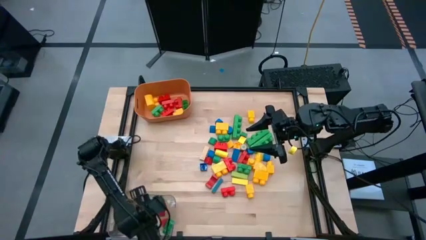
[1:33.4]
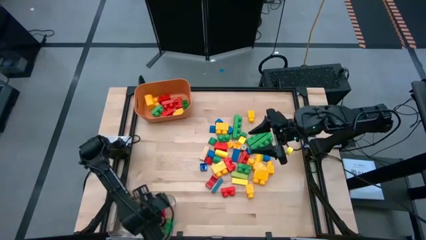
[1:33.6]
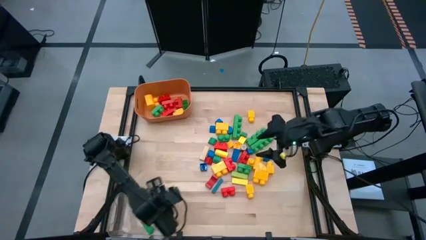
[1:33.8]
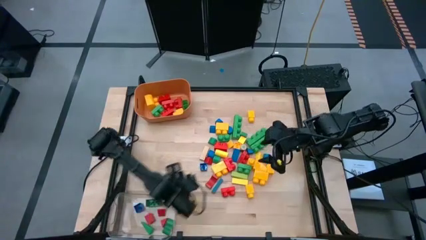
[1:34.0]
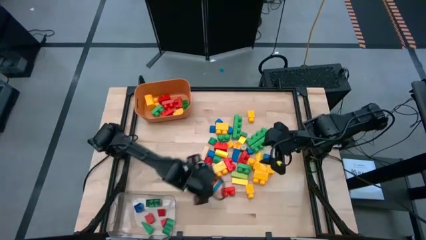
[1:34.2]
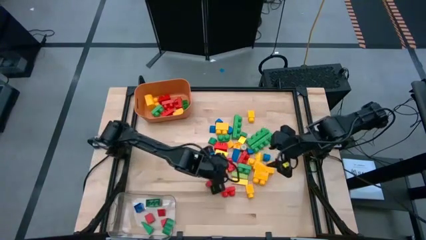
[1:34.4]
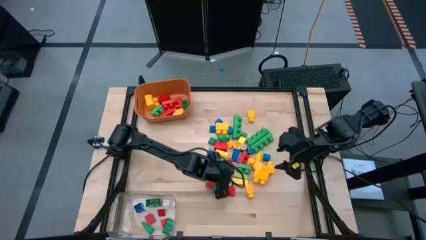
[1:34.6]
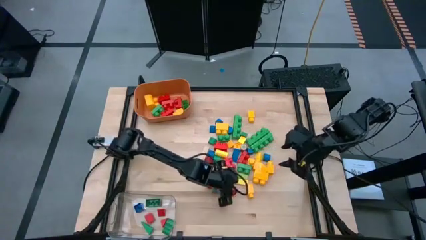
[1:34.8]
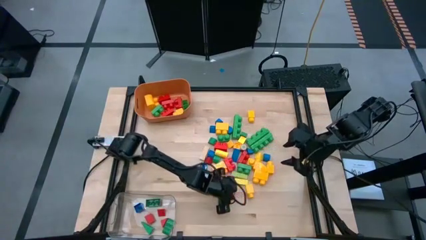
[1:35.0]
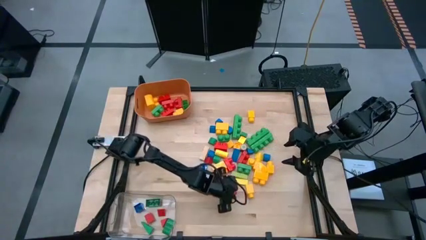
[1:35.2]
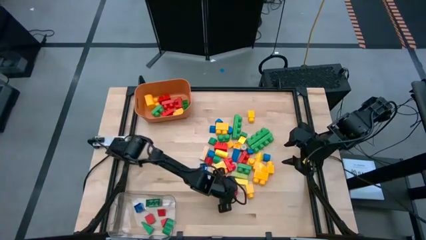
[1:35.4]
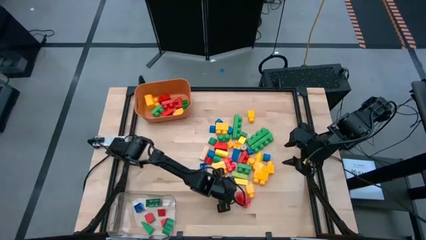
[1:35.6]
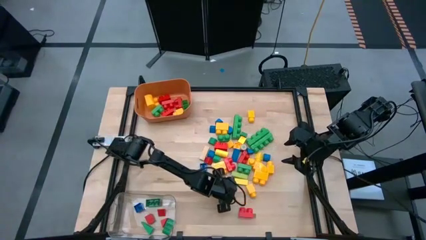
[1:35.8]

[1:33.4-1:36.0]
Task: Sort blocks by size
Put the big red game piece into the orange bin

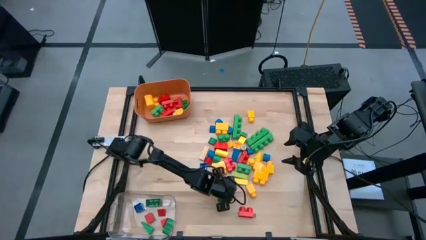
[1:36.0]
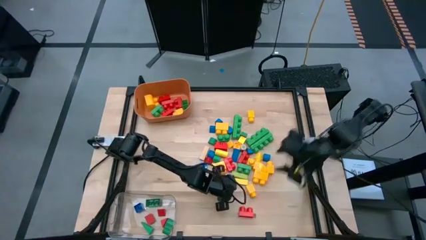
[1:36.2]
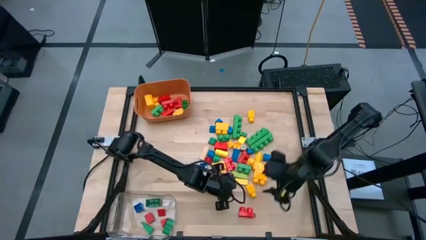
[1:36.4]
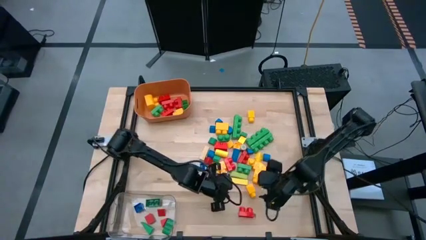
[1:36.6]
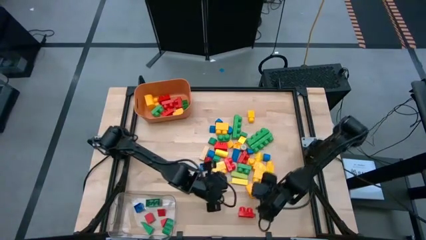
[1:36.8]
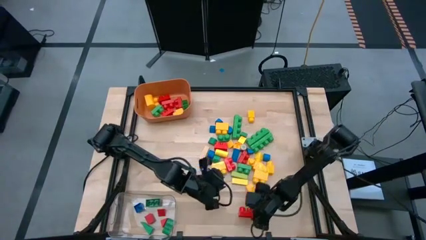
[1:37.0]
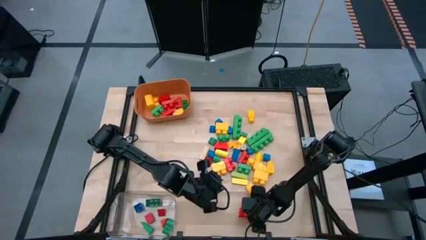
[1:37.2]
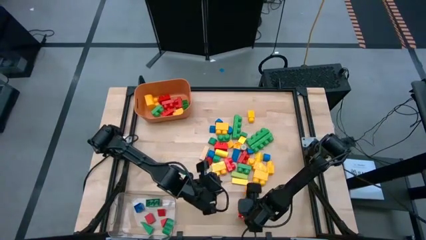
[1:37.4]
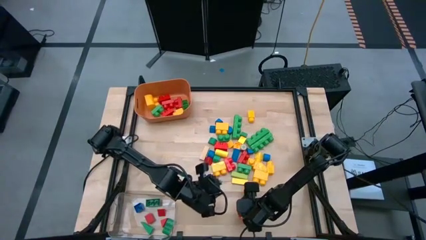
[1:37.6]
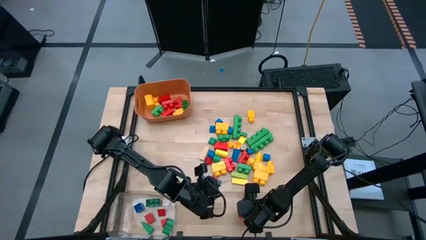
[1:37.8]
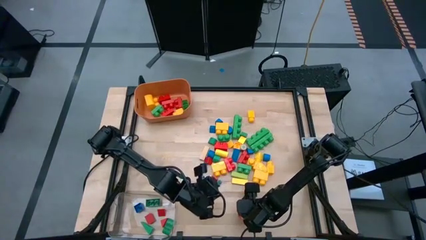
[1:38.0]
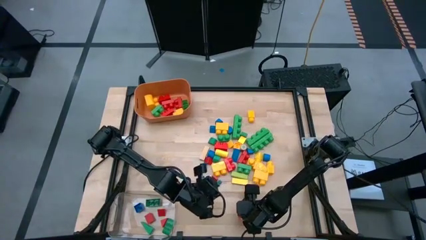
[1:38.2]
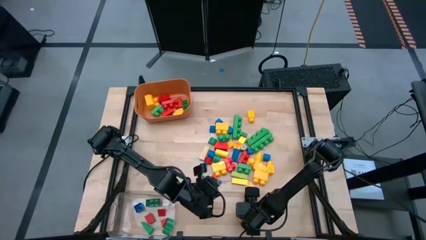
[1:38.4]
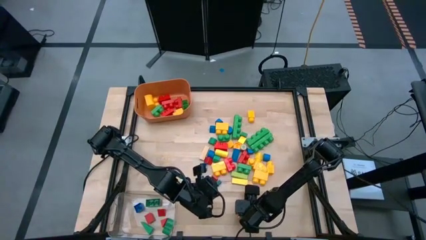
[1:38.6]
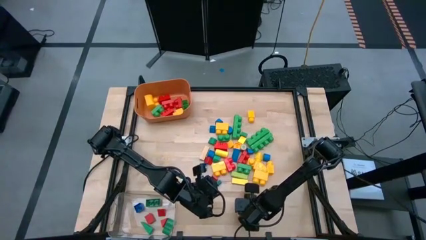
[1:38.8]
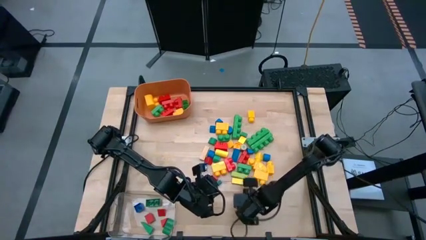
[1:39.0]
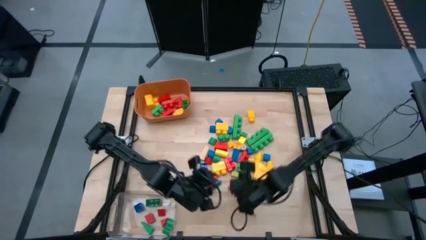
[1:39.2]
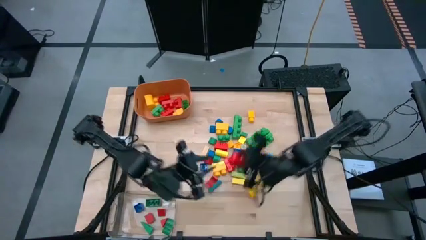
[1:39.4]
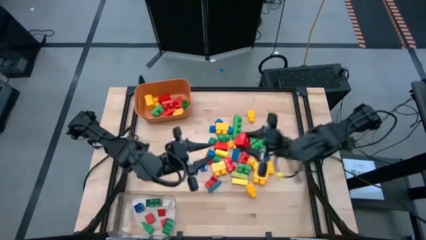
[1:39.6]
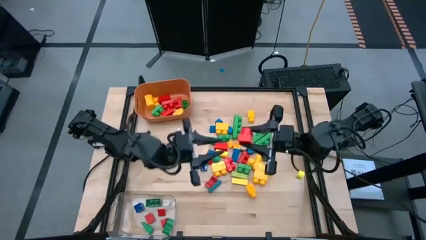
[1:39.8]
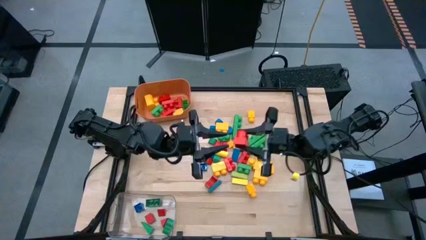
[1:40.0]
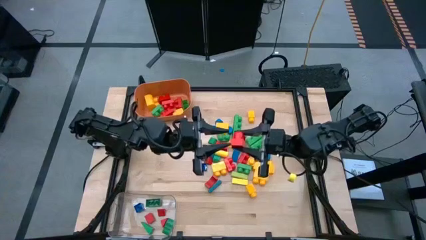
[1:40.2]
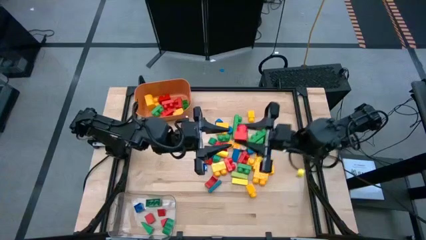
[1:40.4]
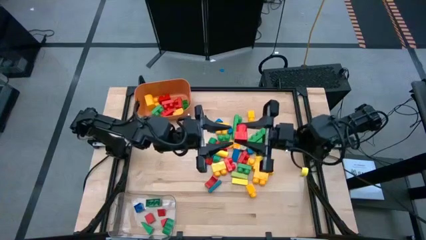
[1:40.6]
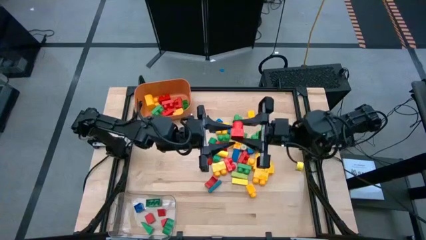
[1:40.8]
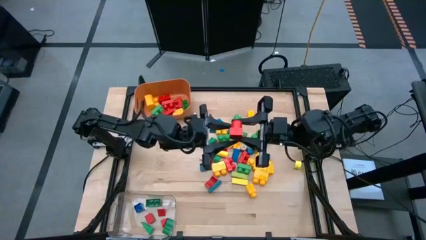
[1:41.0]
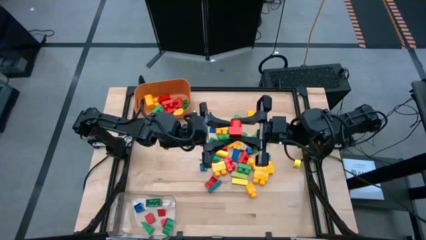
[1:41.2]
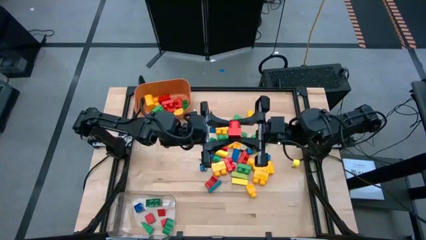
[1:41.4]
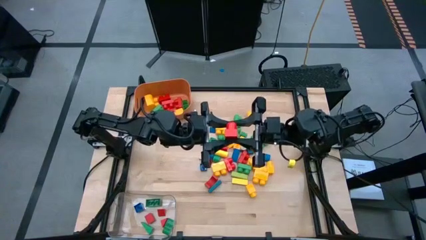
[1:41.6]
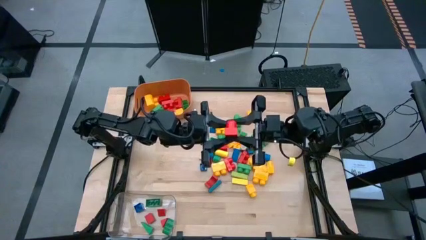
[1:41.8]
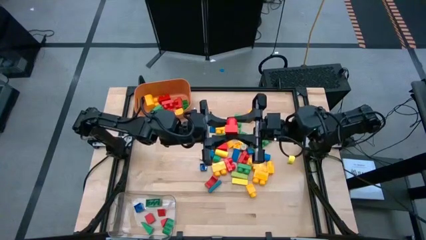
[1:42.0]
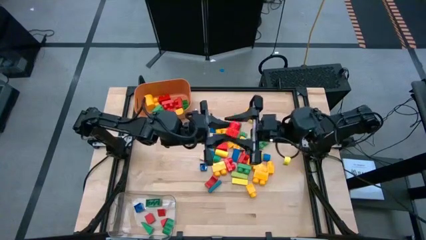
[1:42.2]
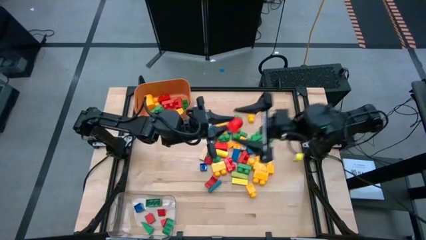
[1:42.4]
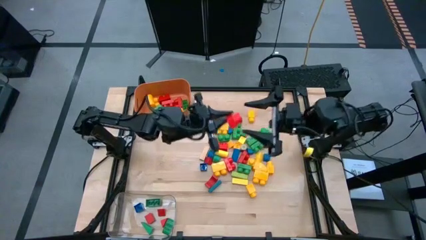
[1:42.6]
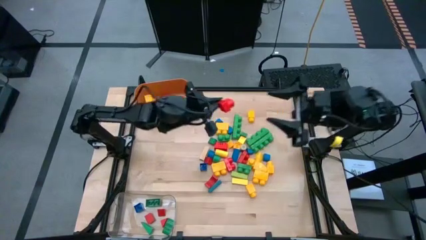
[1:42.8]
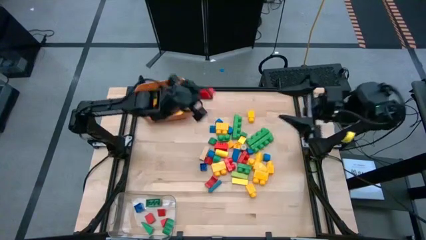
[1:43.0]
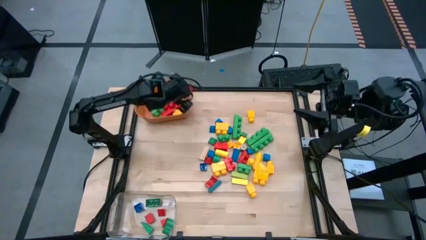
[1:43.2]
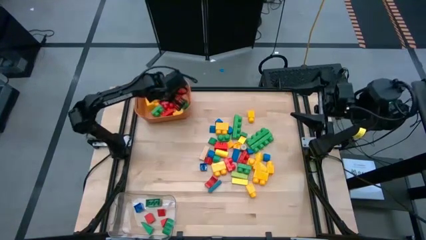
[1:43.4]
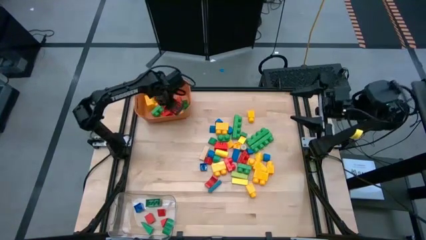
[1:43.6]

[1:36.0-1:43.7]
Put the big red game piece into the orange bin

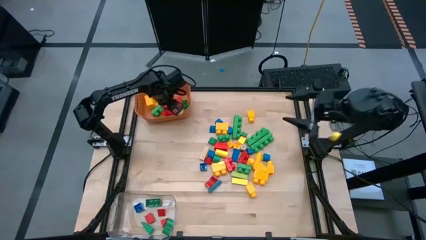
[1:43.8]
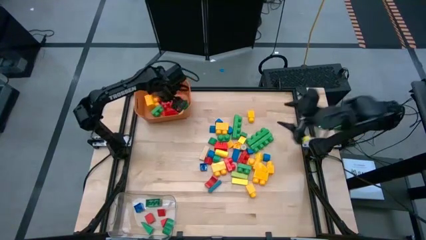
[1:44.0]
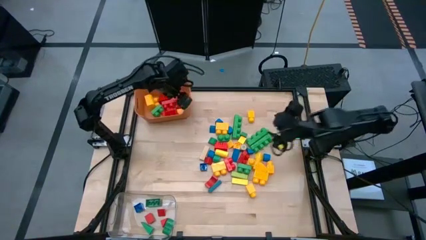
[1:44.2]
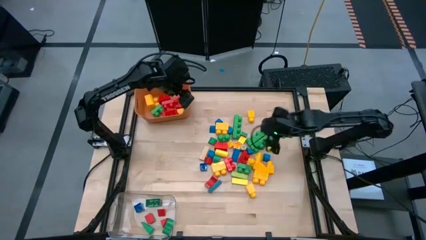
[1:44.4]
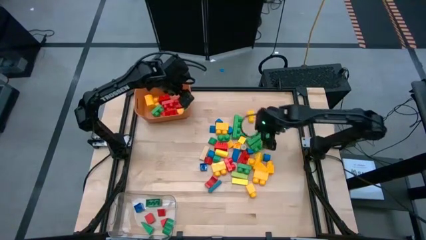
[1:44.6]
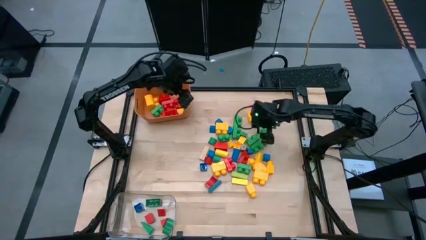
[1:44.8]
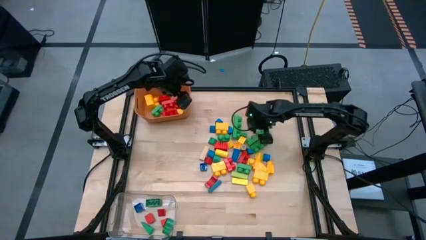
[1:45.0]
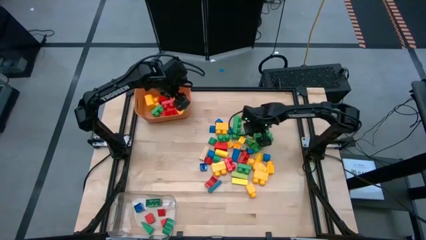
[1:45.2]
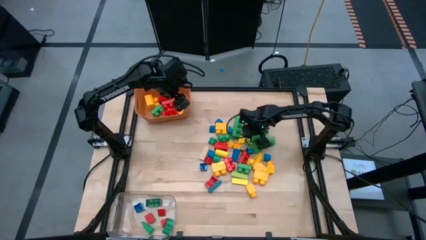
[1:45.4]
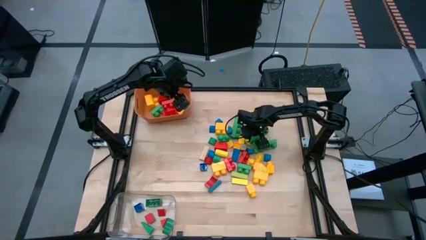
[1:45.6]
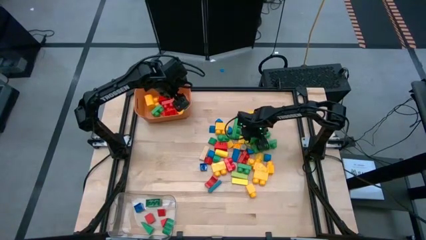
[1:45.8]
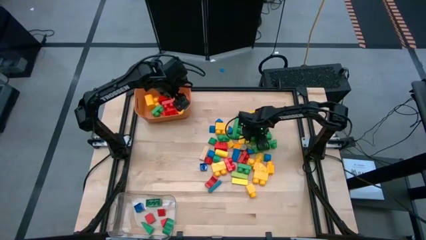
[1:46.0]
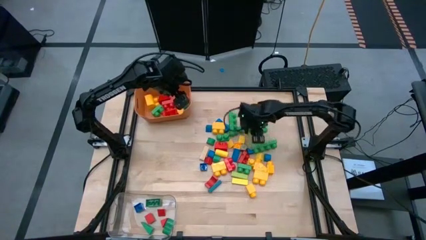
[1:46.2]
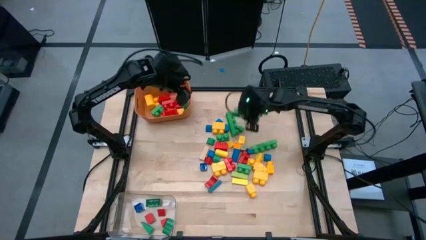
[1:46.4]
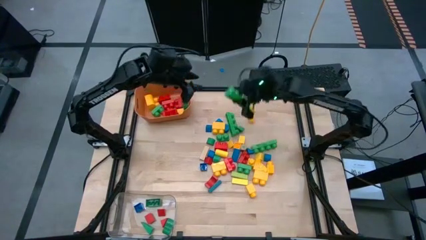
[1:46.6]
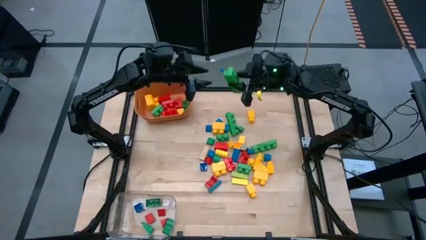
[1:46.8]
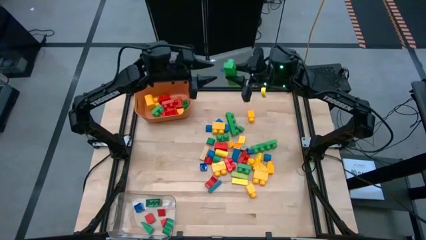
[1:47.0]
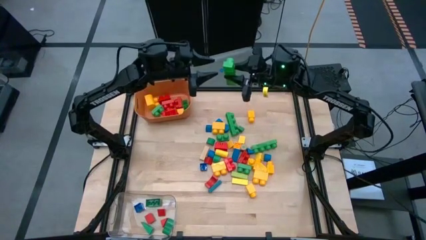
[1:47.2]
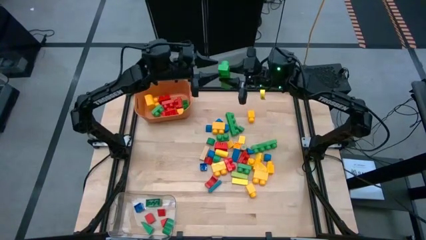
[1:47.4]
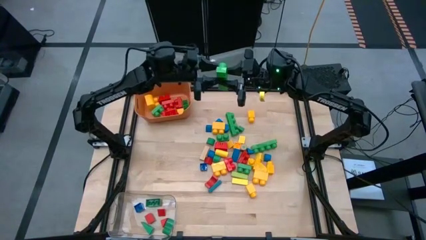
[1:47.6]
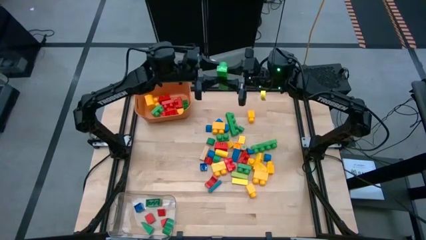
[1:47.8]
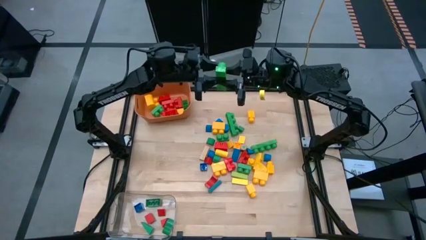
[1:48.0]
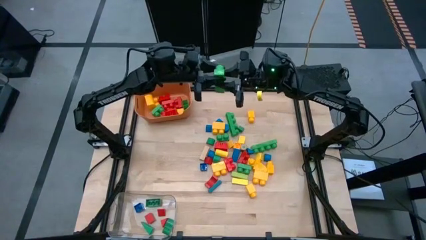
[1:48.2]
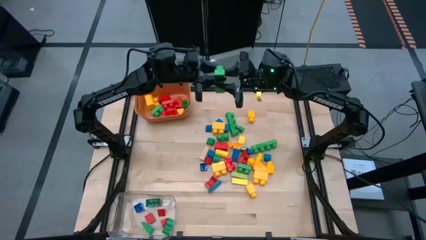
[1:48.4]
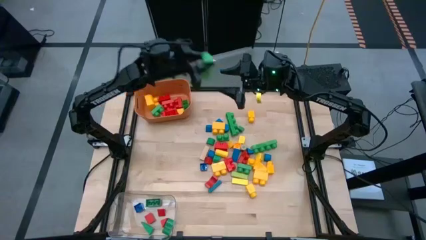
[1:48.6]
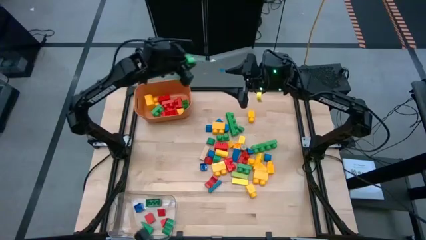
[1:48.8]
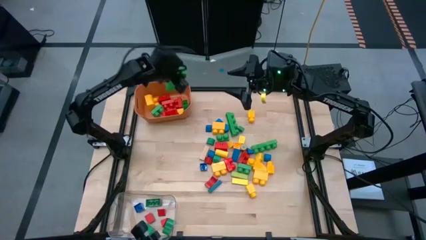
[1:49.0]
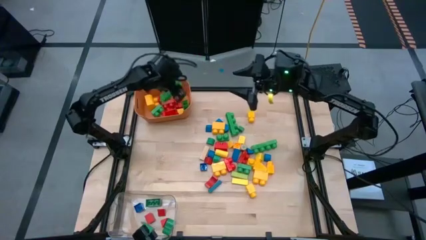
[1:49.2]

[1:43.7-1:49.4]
Put the big green game piece into the orange bin
